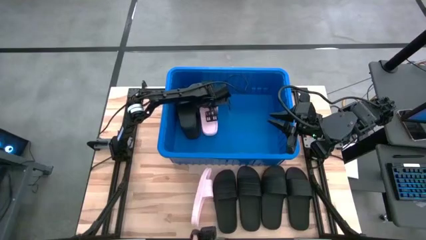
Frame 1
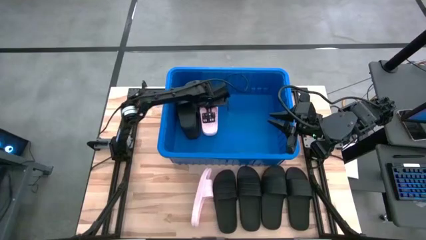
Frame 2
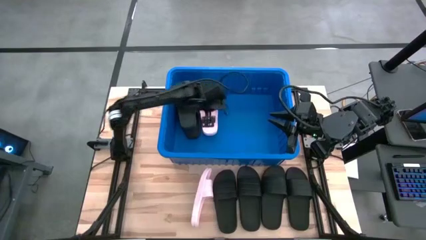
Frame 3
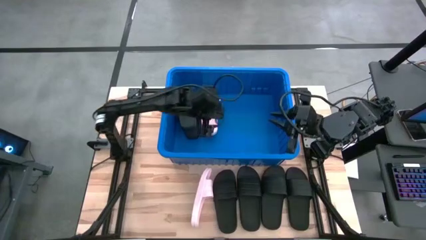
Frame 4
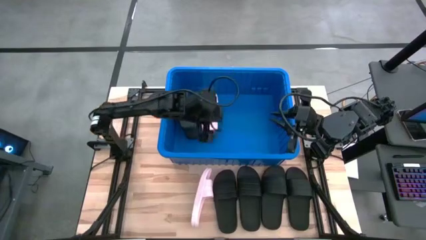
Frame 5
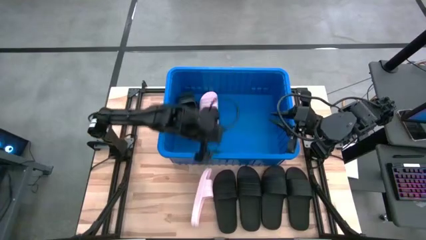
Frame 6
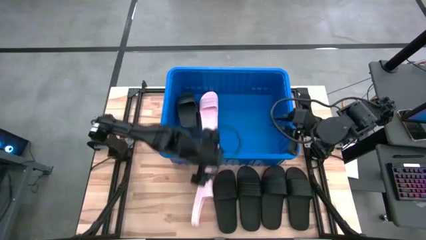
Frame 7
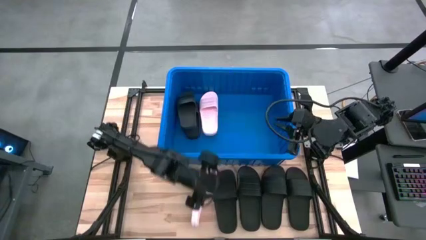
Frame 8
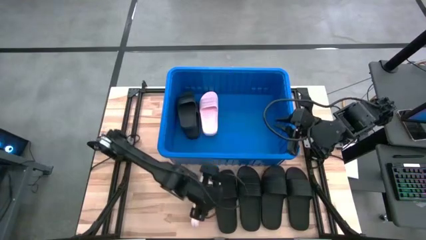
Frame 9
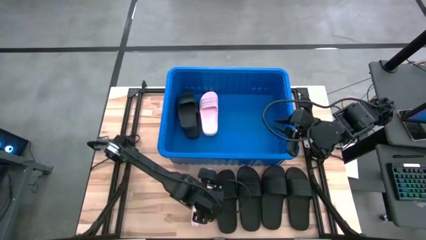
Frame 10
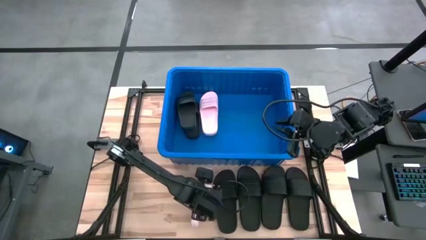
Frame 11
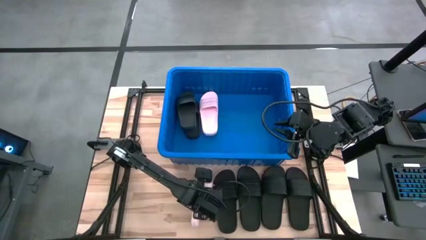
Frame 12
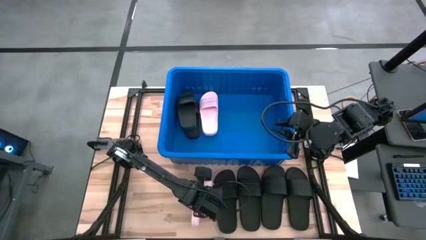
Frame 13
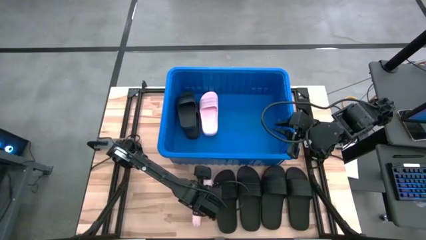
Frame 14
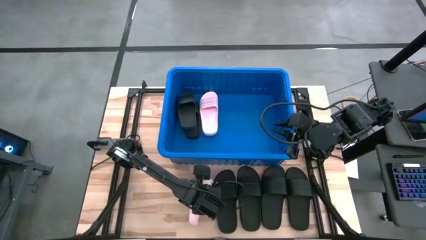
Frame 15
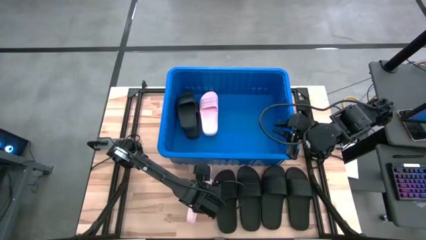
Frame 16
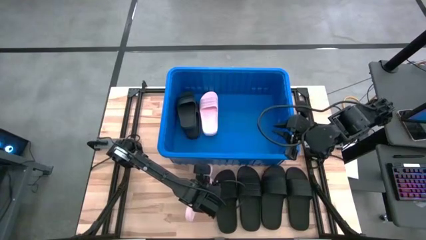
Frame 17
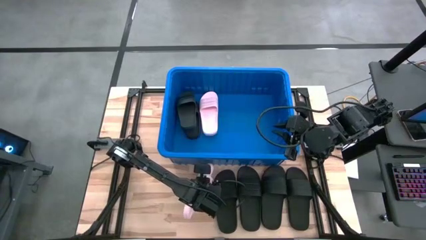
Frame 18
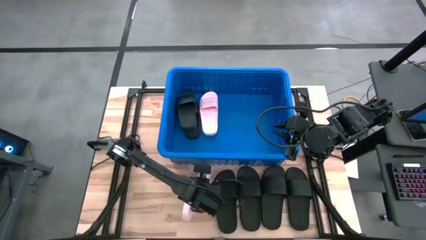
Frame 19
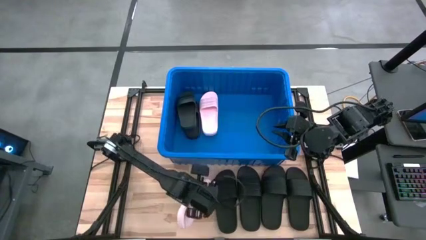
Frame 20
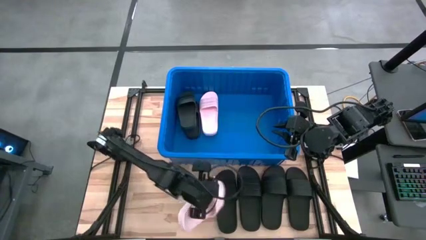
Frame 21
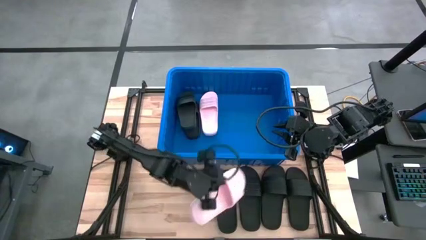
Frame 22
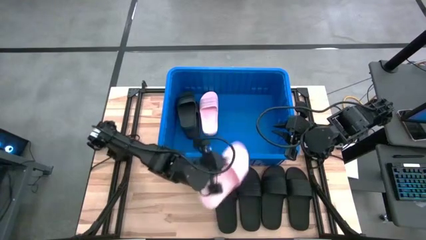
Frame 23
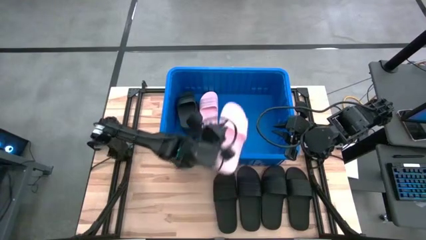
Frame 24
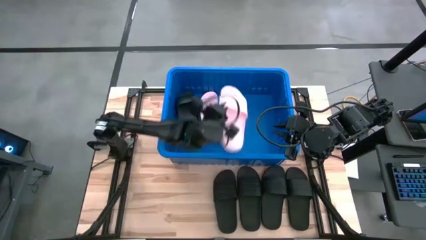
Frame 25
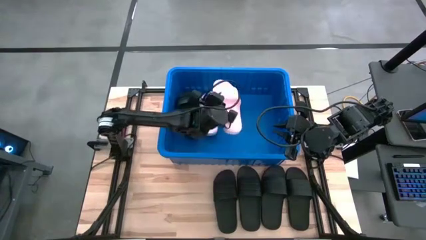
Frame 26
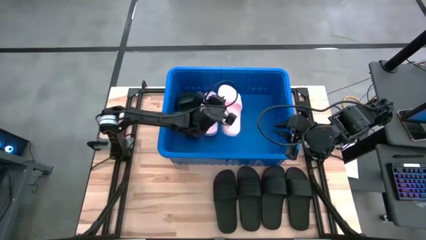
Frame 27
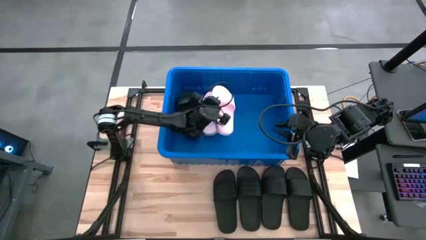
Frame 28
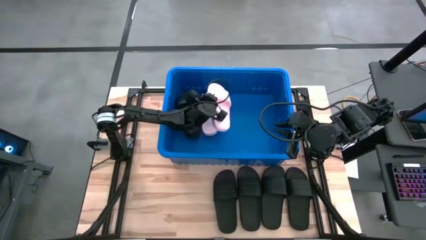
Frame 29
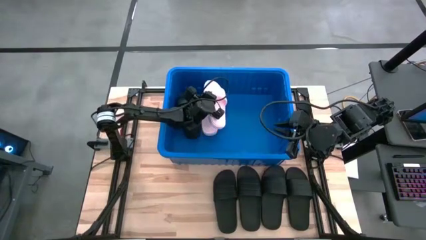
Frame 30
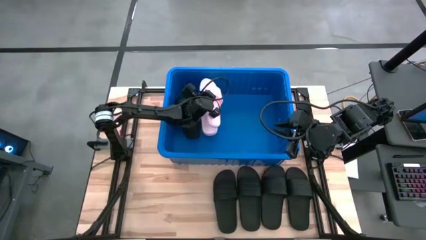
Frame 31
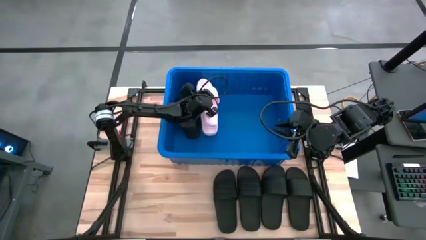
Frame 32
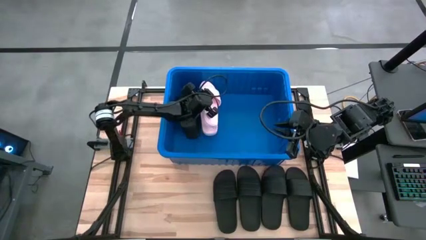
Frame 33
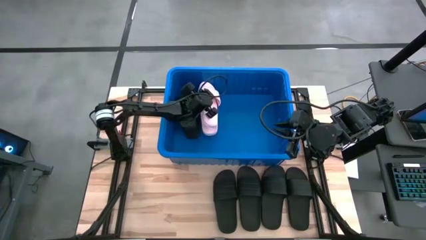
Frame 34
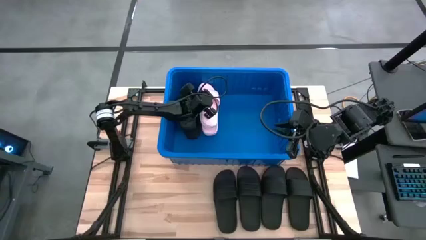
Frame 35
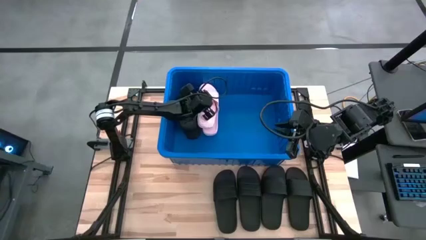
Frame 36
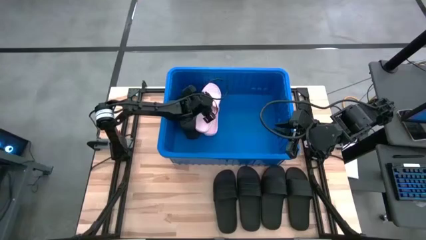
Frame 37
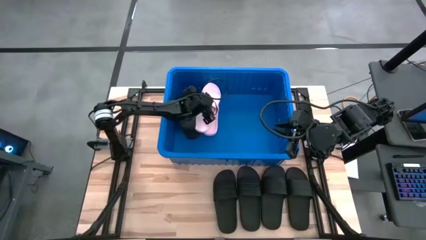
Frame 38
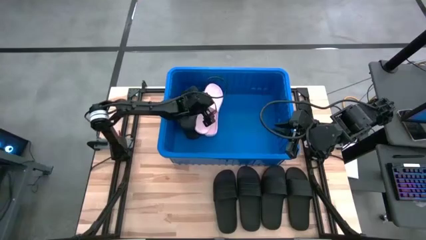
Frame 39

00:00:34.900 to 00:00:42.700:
Task: Pick and place slides into bin
Put the pink slide into the blue container

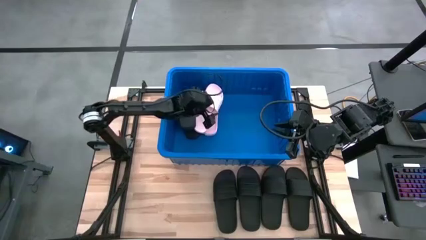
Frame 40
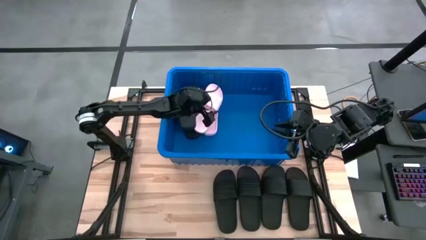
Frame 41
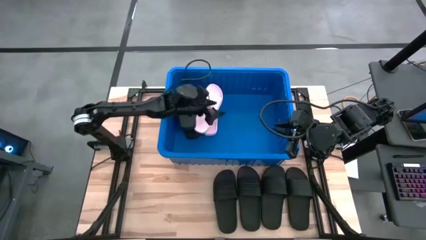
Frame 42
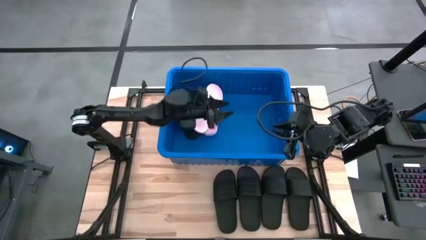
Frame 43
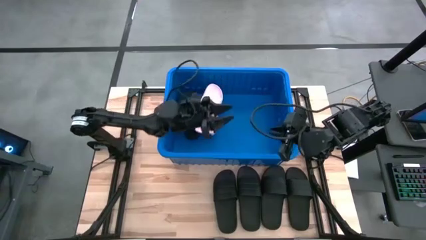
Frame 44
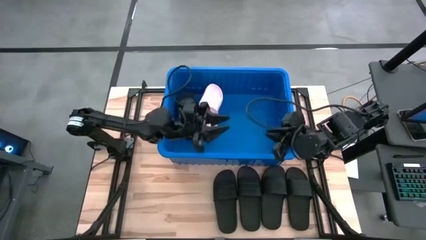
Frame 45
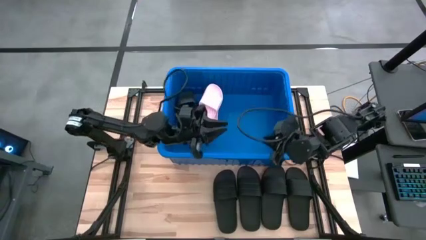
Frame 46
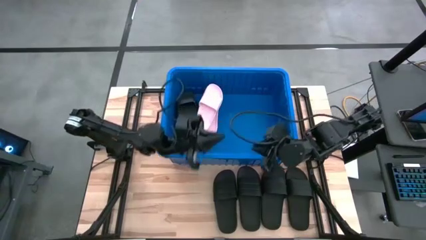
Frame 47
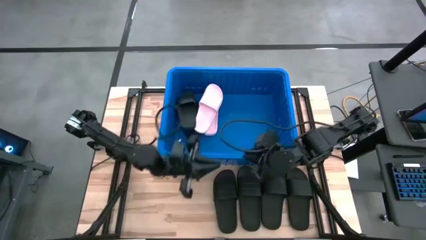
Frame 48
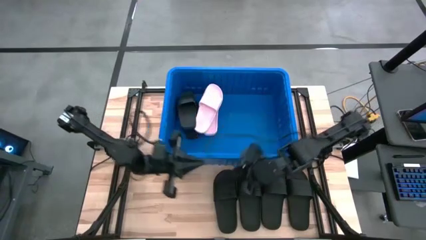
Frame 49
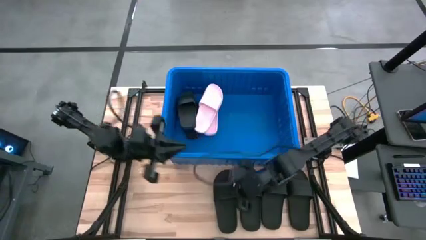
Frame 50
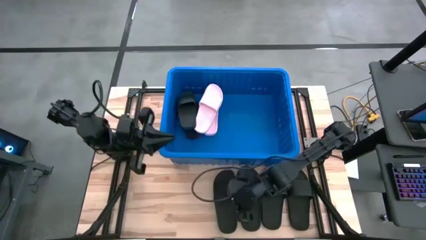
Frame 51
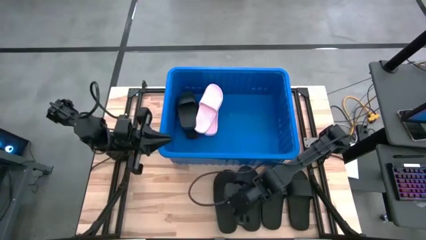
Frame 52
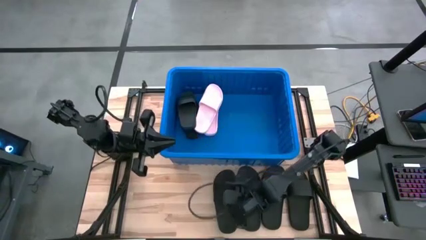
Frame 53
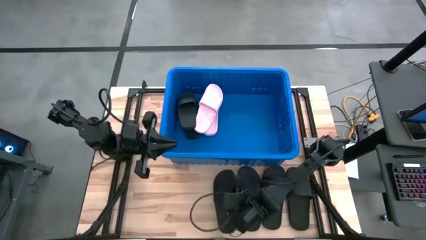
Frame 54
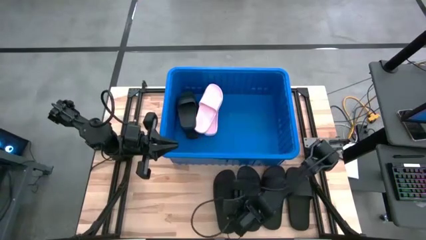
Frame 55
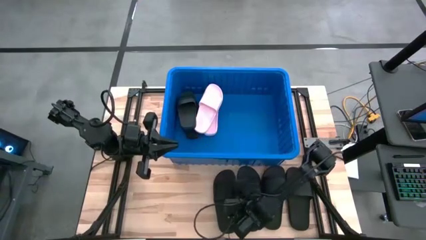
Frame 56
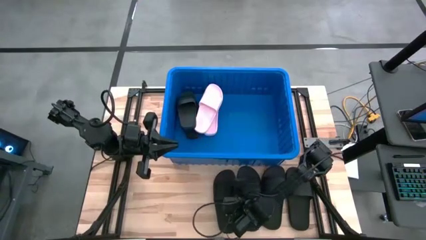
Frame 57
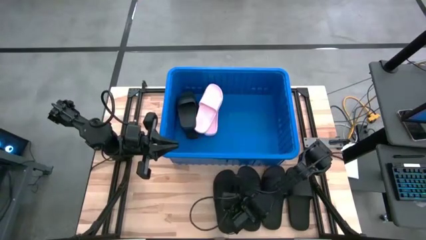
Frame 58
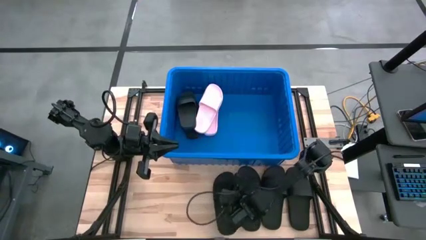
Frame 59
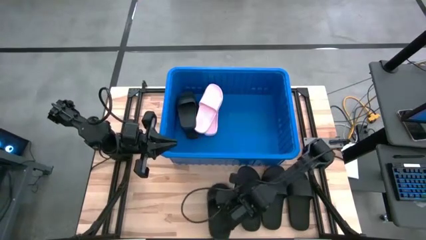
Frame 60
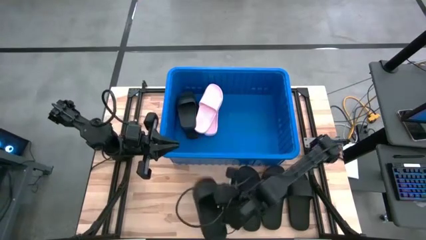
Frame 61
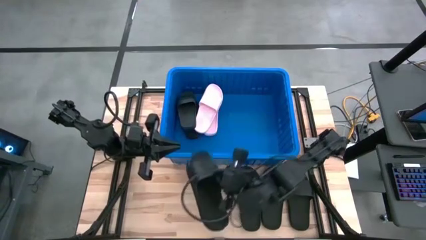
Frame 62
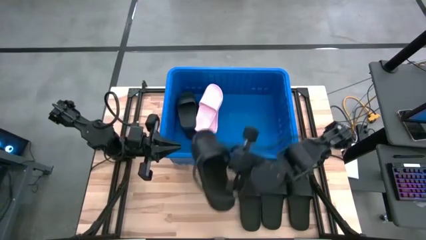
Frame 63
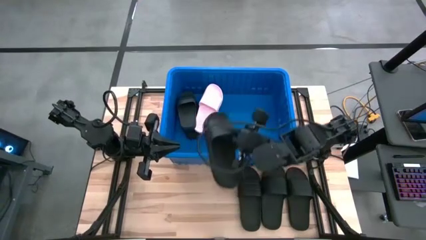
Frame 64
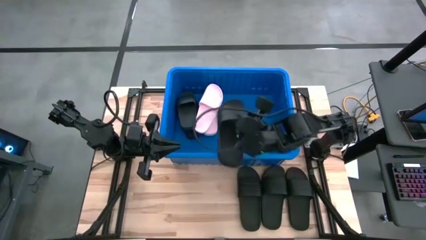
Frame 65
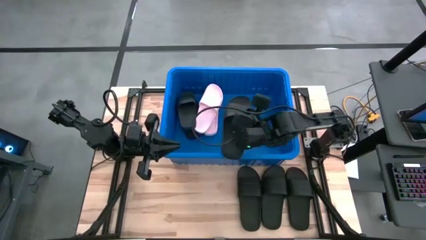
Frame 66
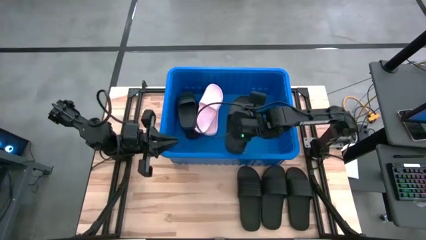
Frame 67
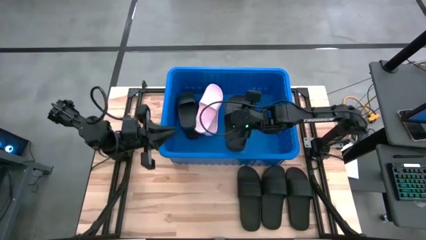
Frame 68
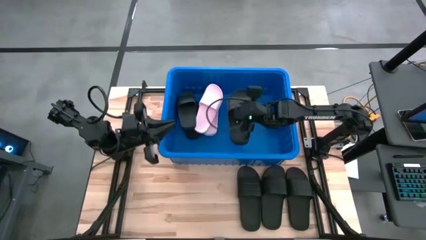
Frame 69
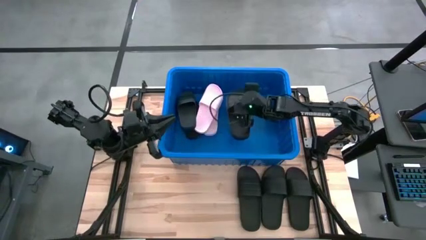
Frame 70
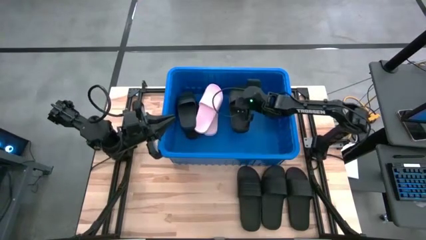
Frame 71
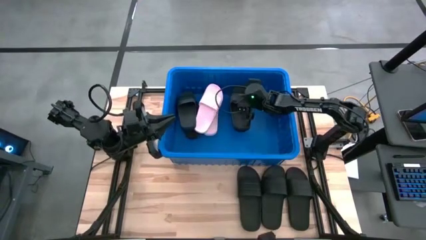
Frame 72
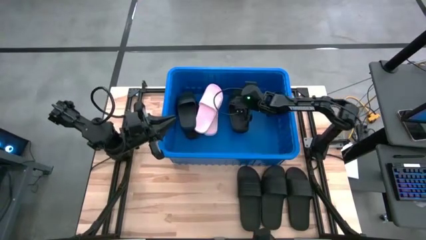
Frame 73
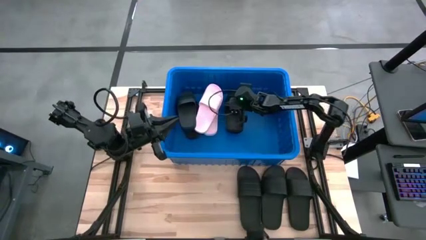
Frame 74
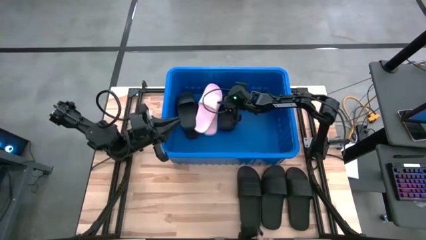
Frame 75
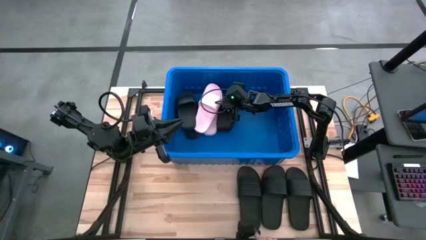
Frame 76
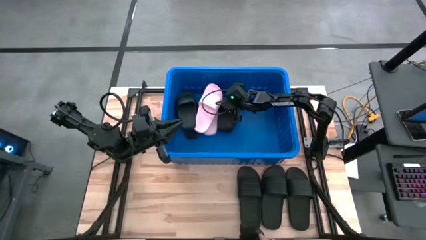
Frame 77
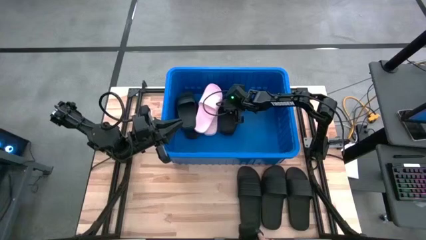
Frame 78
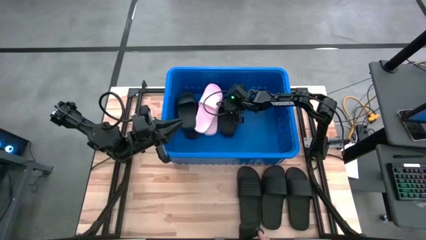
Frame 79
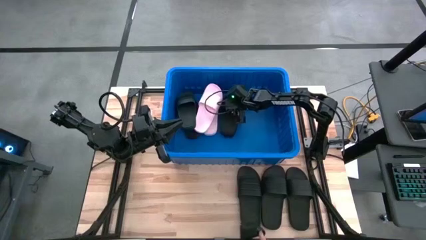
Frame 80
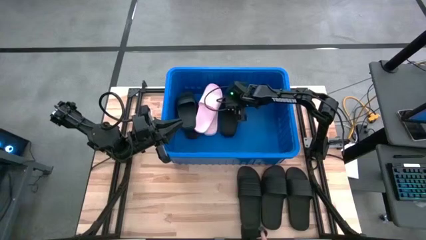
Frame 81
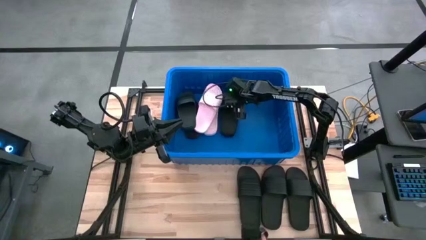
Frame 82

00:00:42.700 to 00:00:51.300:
Put the black slide into the blue container
